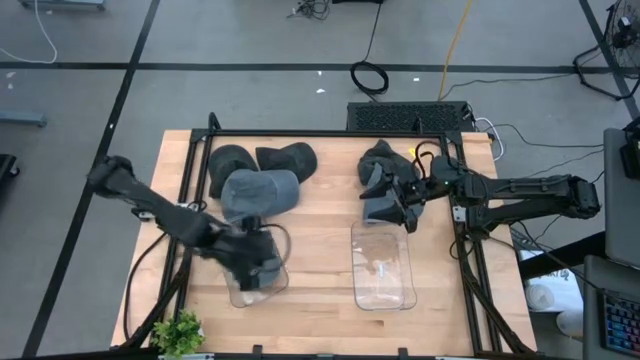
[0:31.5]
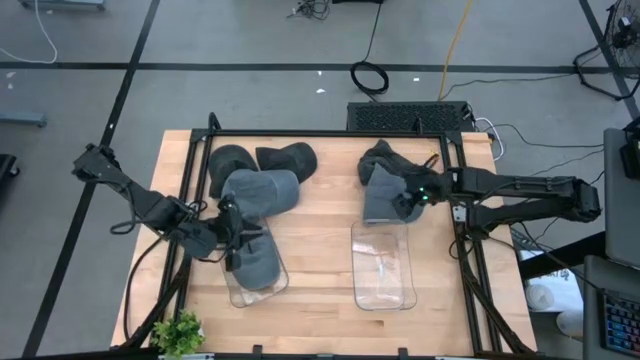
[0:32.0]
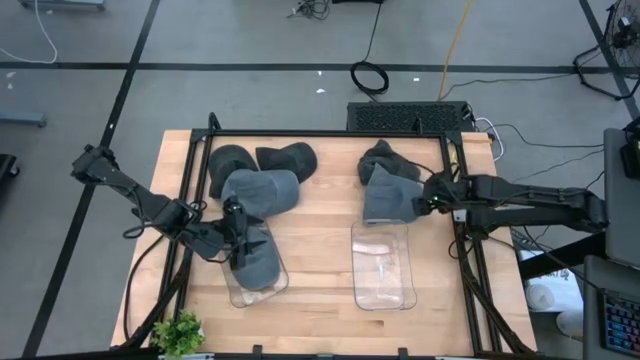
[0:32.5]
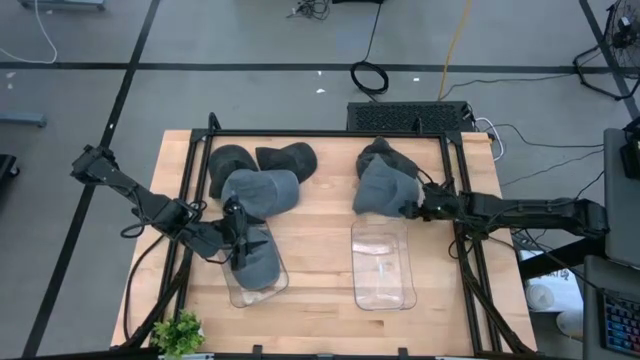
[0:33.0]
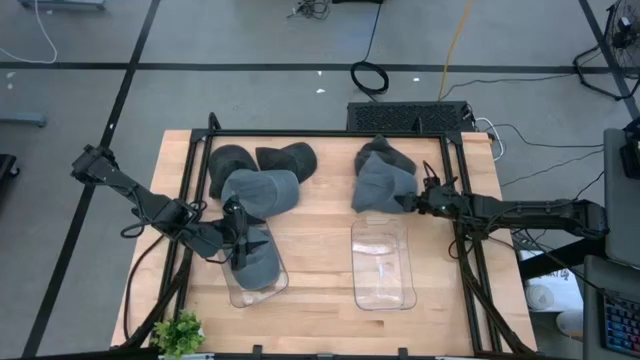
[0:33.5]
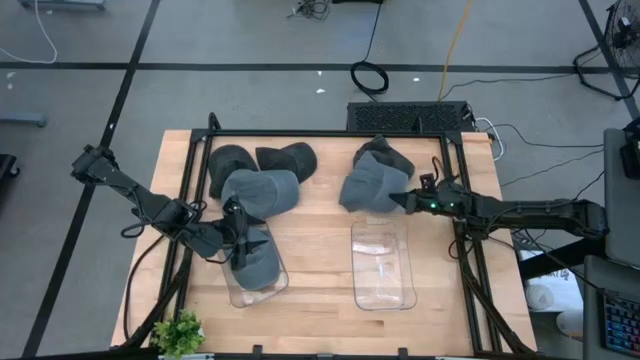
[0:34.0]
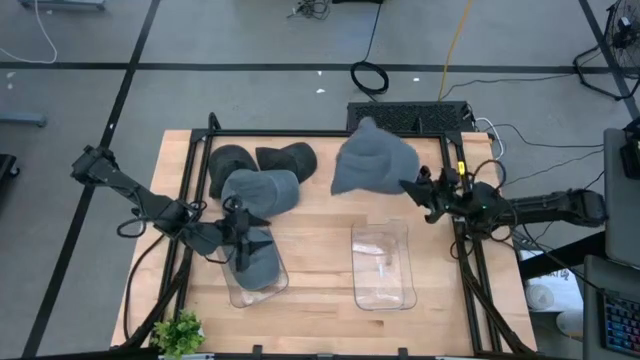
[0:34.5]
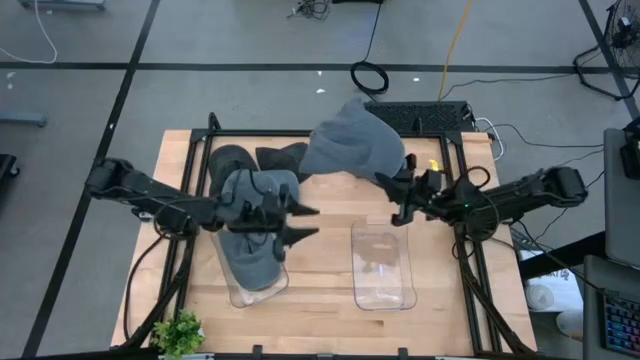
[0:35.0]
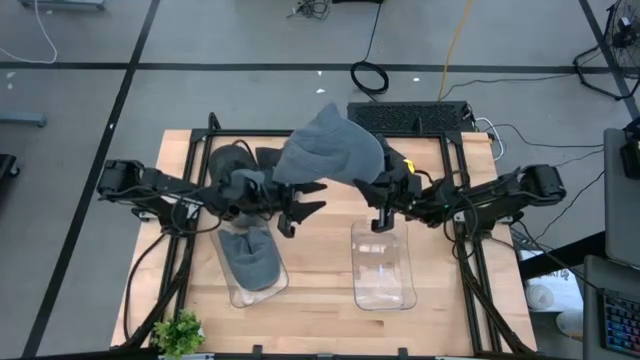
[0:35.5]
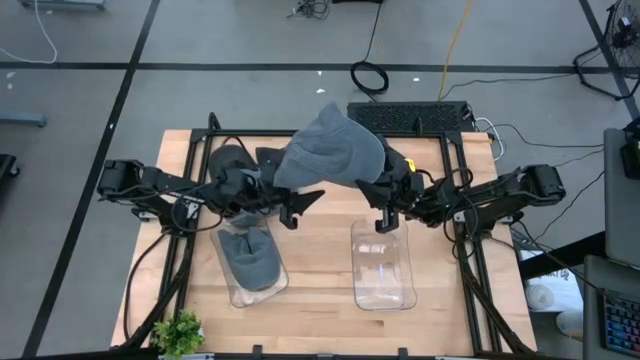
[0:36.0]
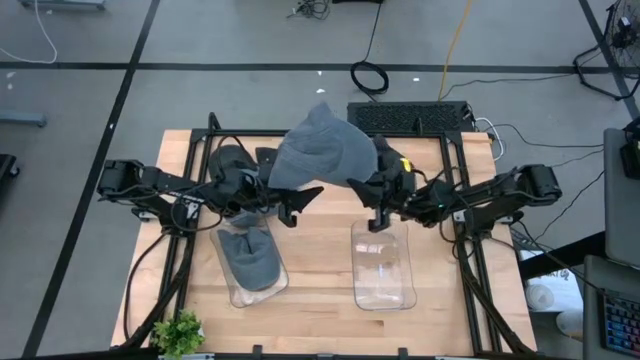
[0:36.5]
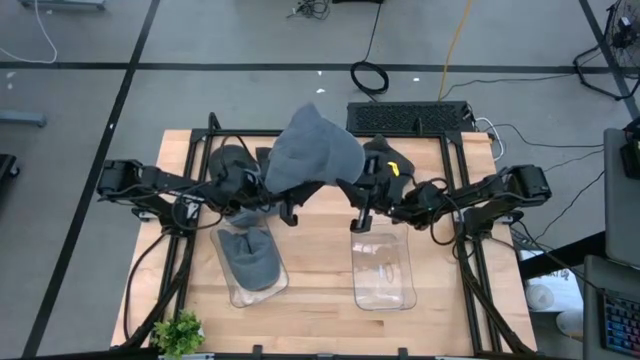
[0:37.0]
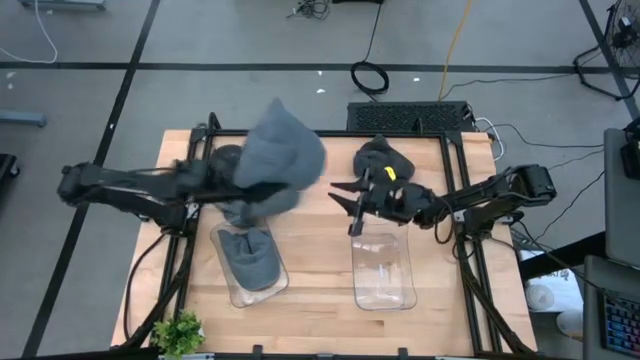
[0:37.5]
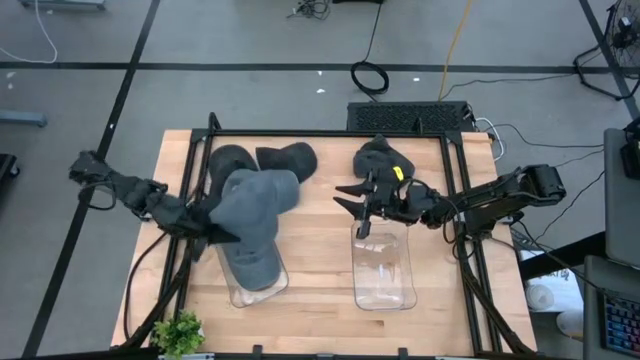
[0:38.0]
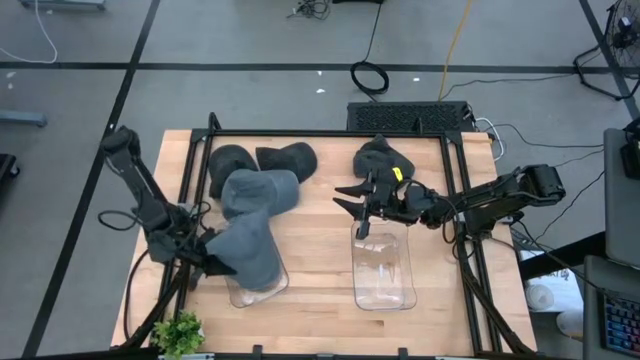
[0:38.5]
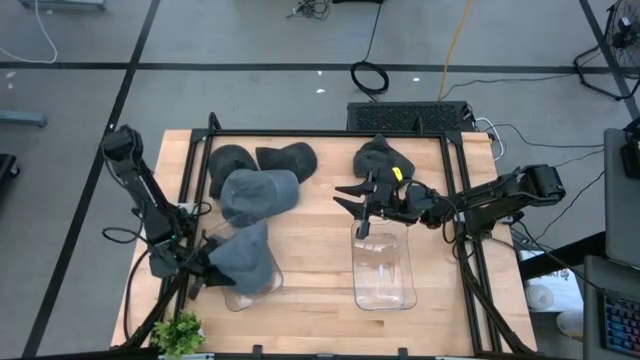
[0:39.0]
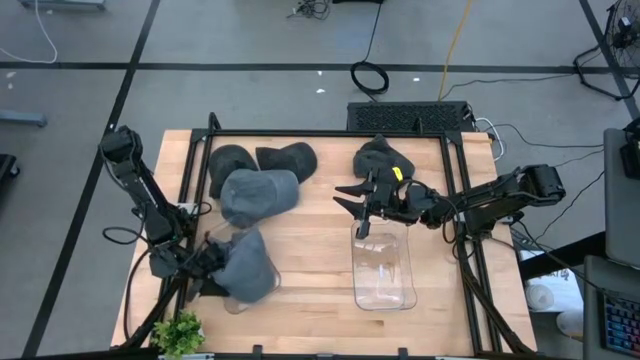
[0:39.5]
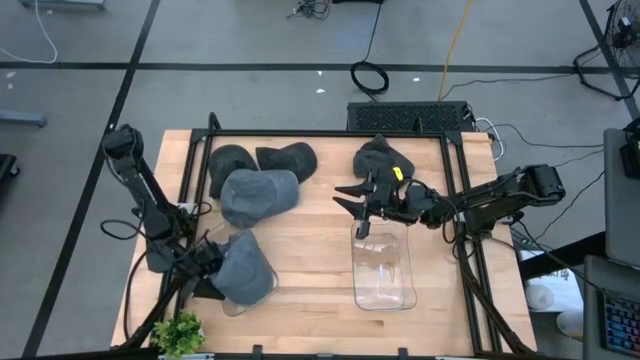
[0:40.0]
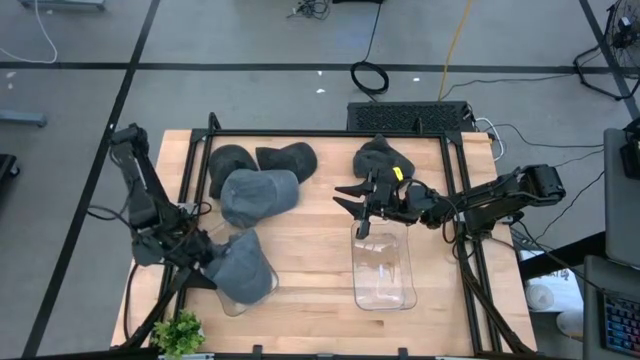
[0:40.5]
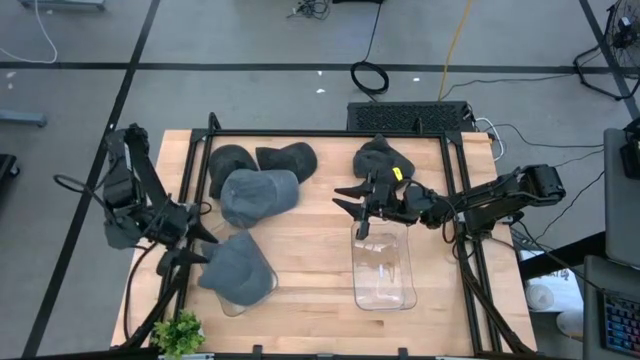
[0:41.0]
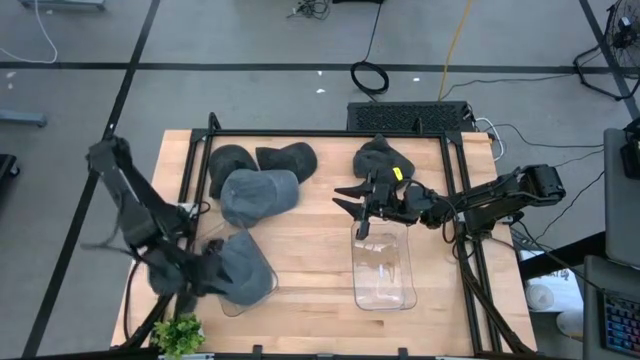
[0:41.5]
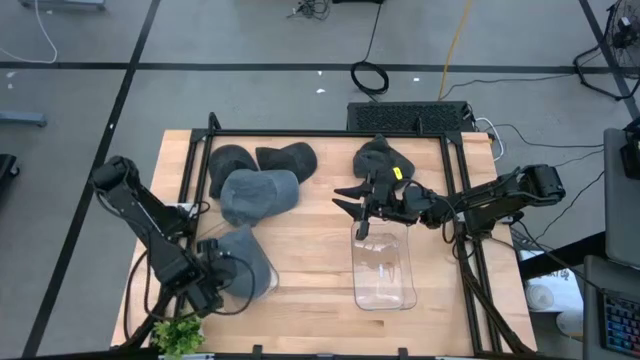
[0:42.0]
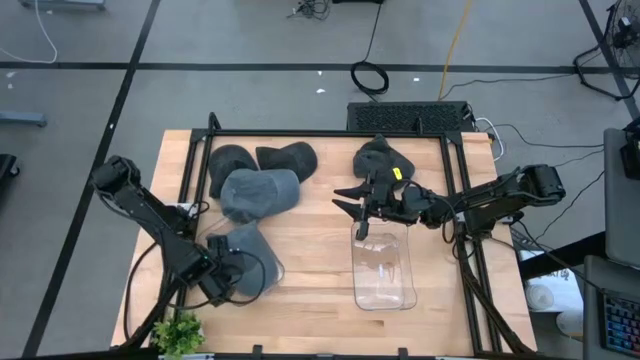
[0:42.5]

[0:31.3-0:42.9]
Task: Pick & Place hat
Put the right gray cap into the left transparent bin

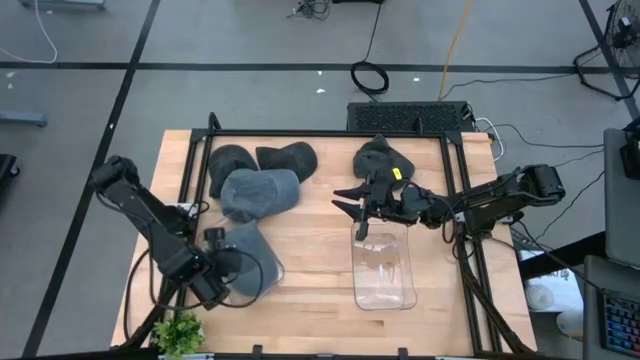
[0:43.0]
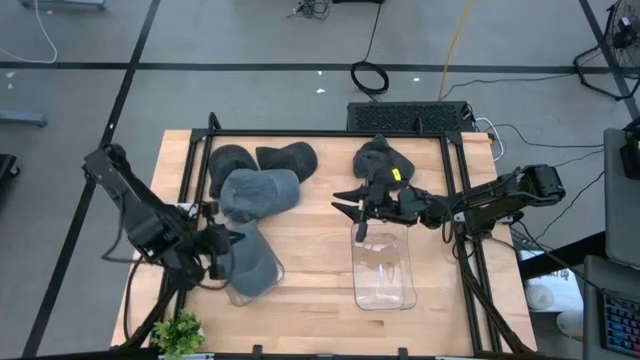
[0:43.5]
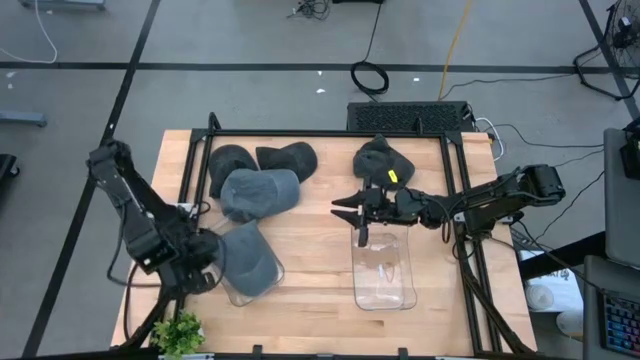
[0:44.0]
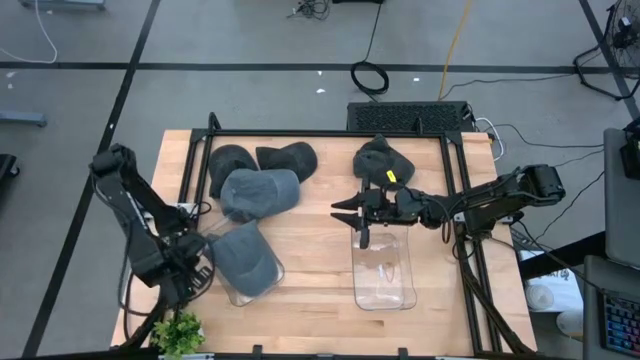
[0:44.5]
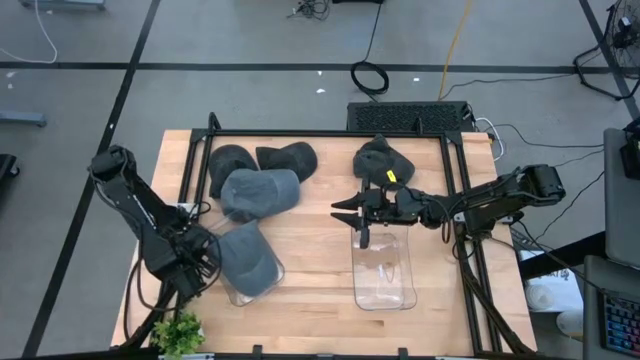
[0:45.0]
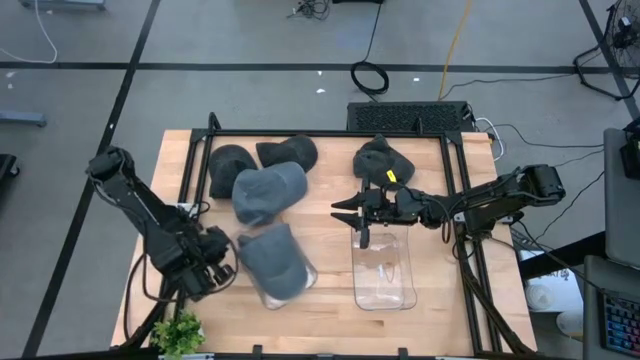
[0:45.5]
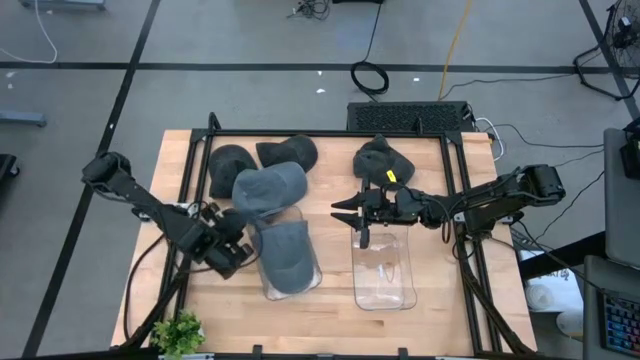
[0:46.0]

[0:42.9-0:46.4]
Adjust the left transparent bin on the table

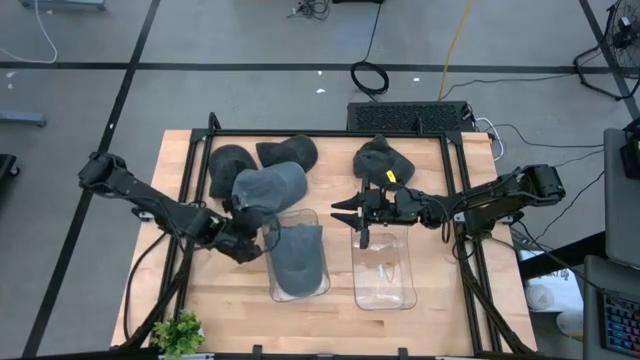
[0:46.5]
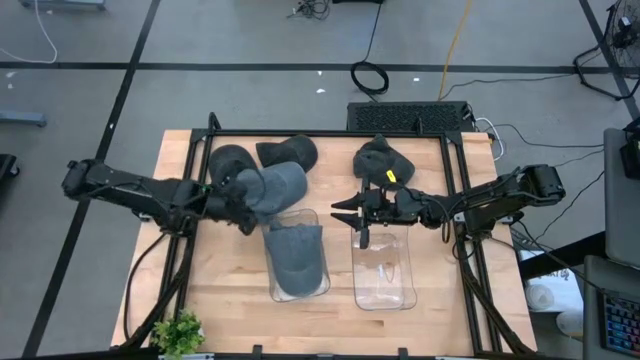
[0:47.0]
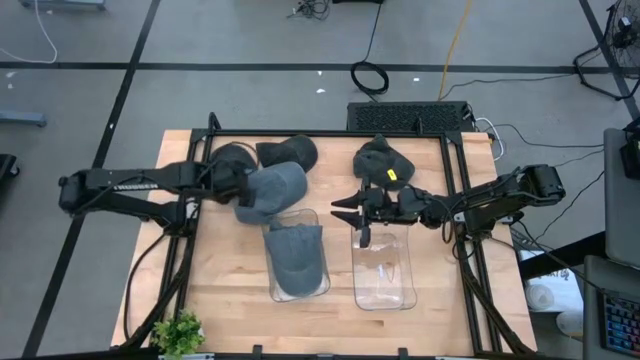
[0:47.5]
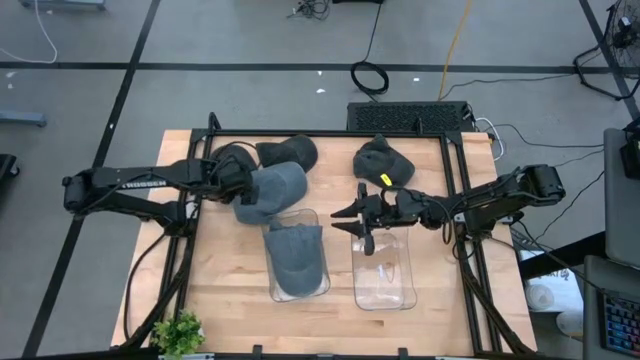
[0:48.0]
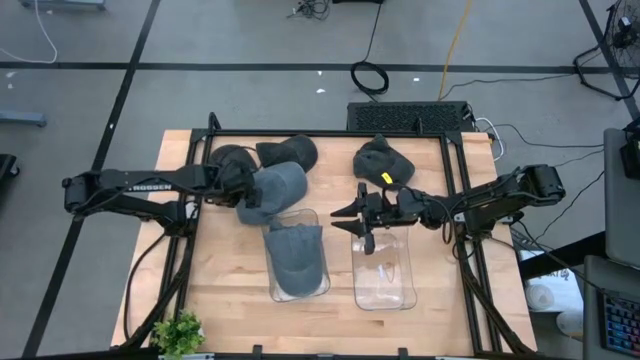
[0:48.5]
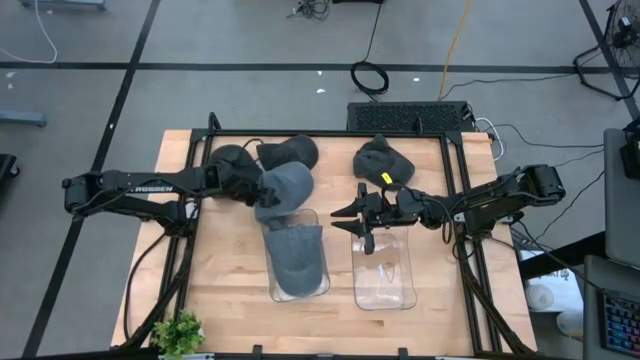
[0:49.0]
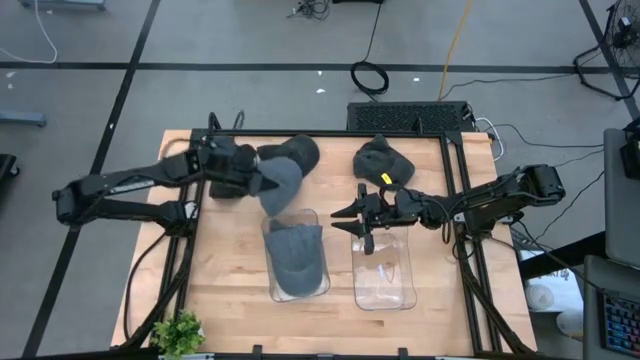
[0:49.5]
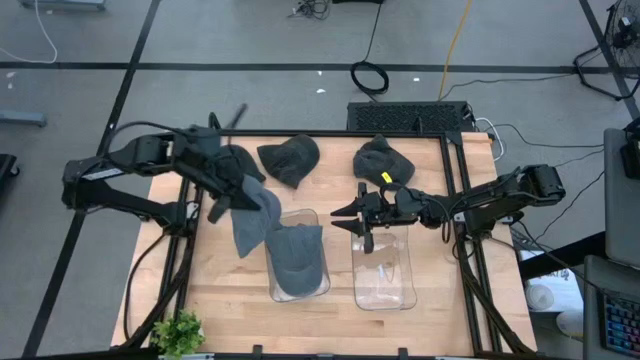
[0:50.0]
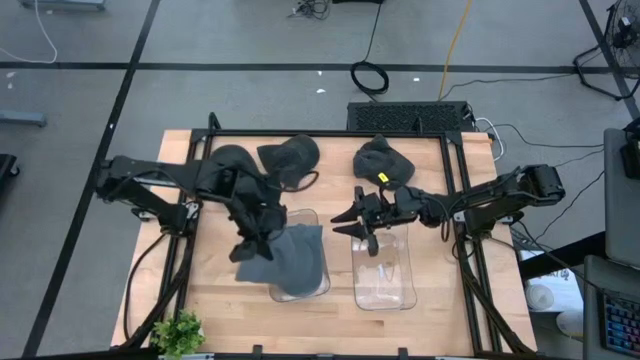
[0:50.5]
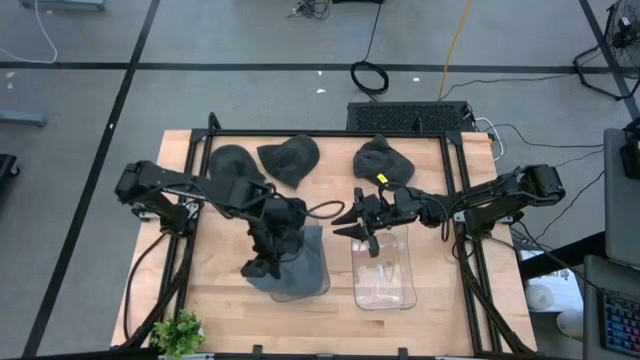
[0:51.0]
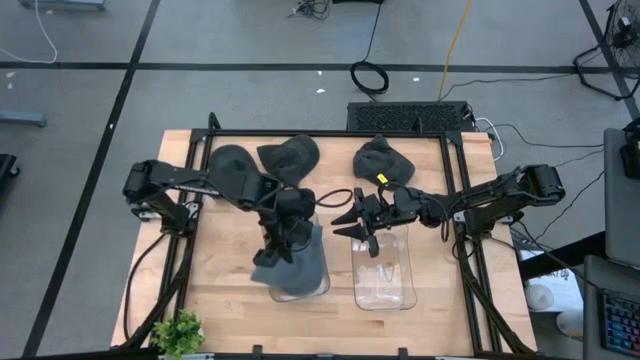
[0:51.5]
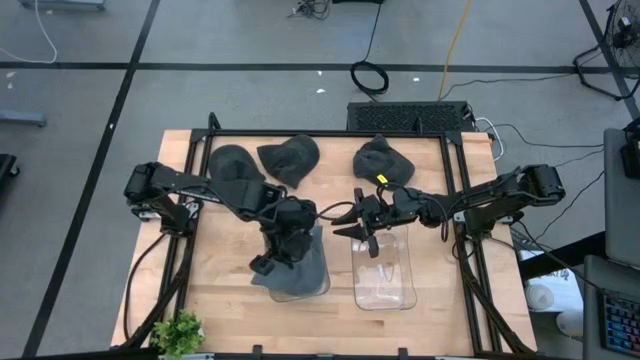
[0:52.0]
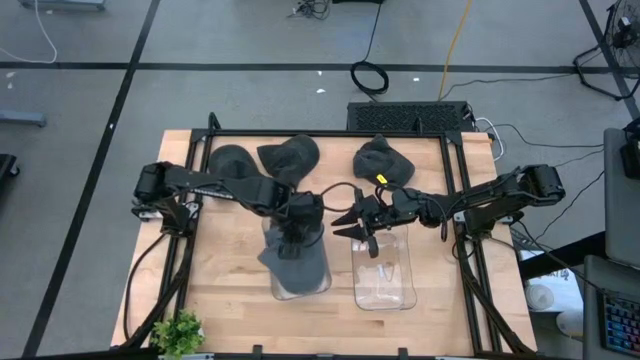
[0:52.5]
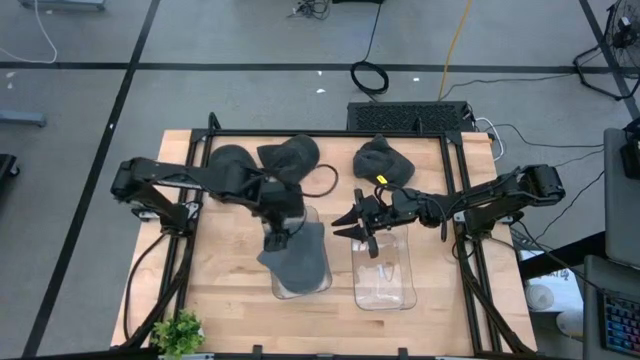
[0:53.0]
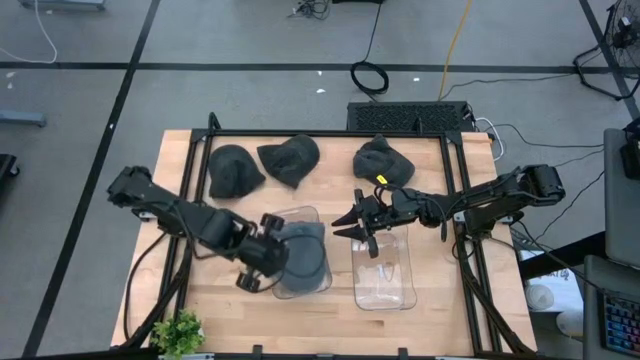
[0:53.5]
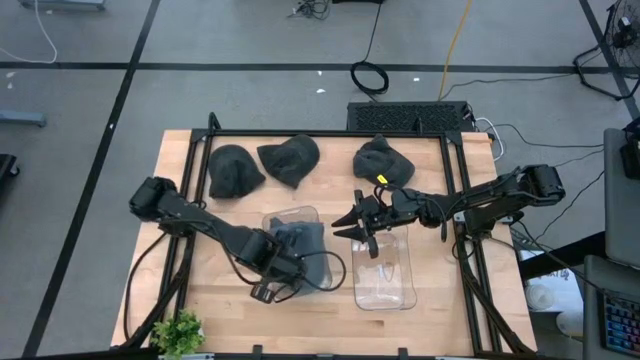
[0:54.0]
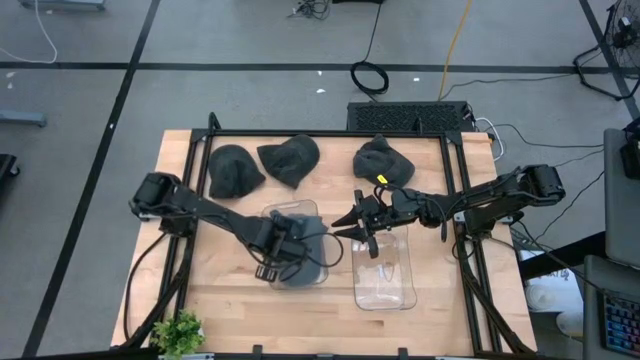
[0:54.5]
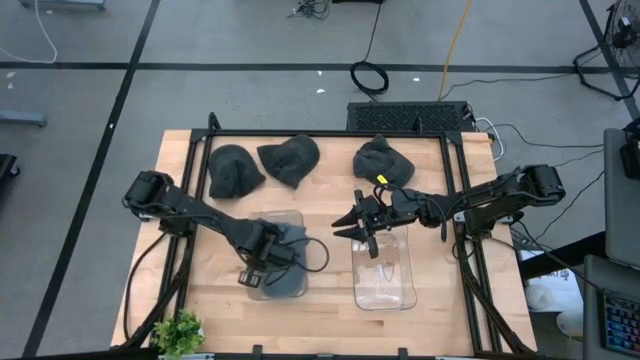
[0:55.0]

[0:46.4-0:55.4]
Put the gray cap into the left transparent bin
